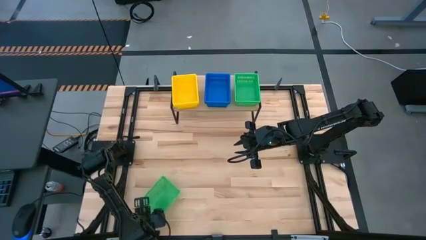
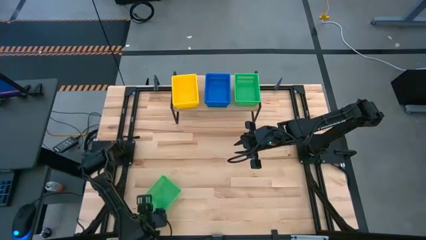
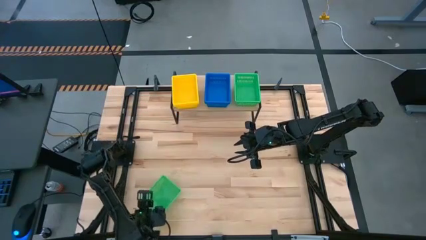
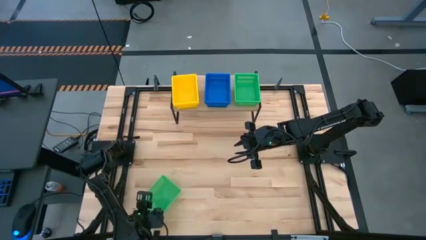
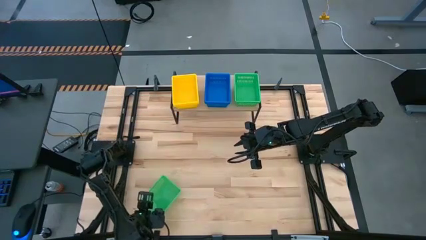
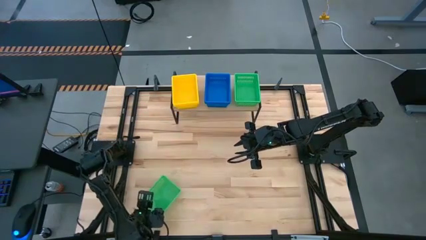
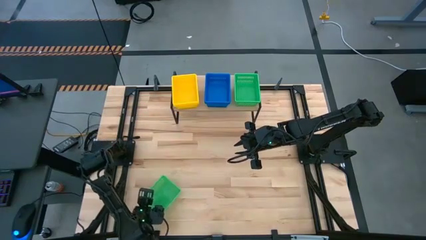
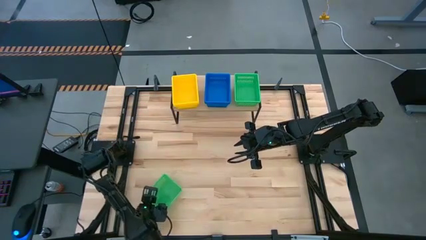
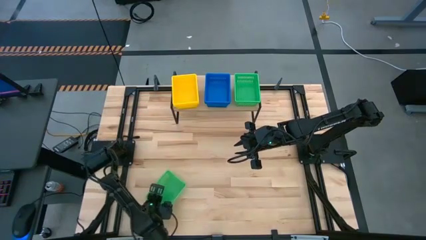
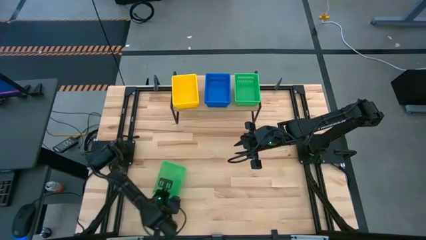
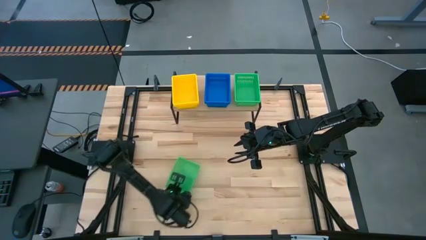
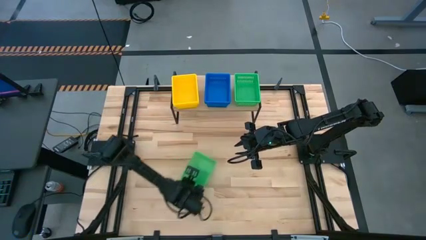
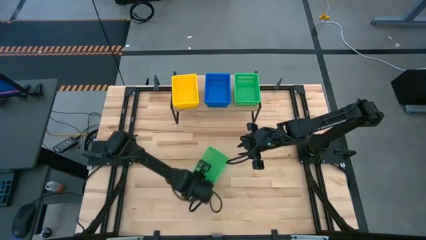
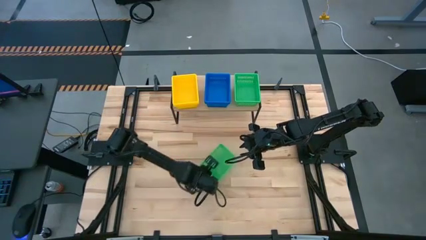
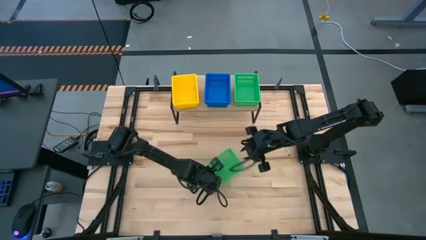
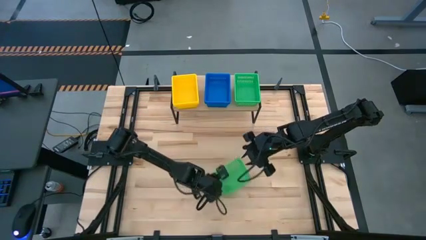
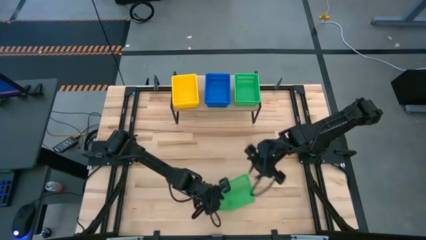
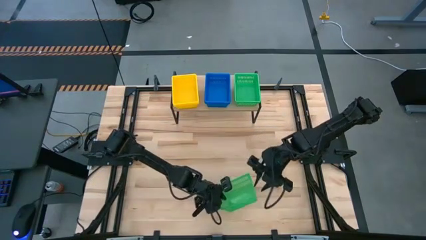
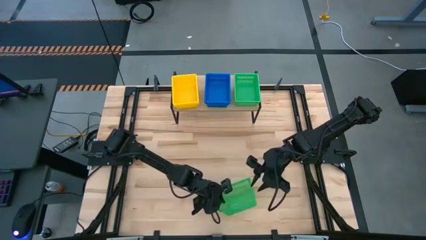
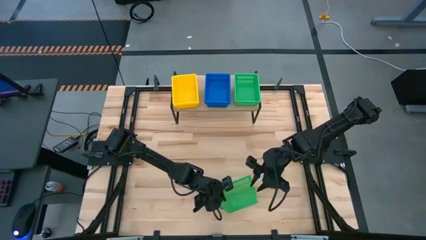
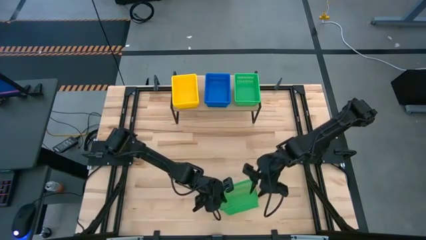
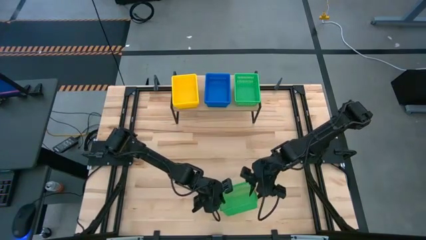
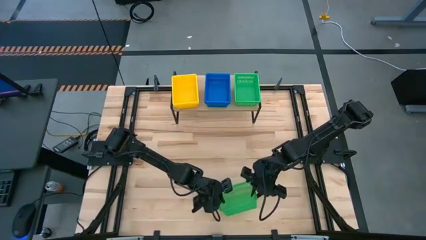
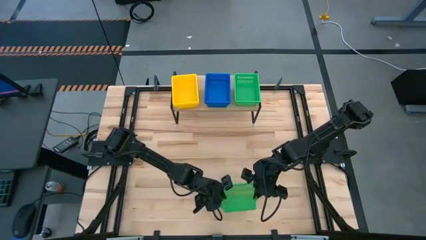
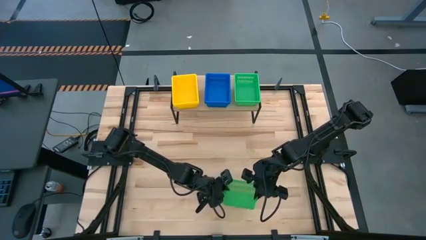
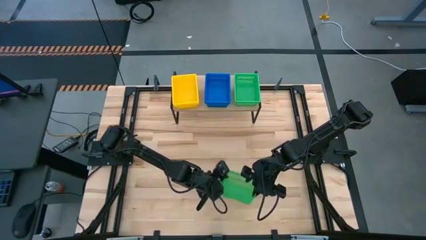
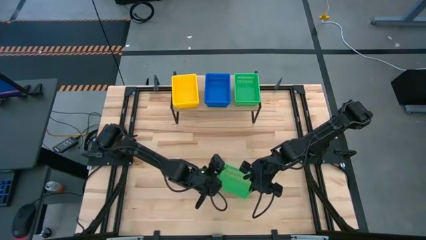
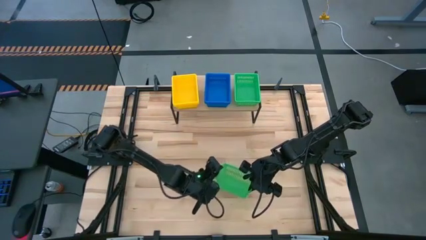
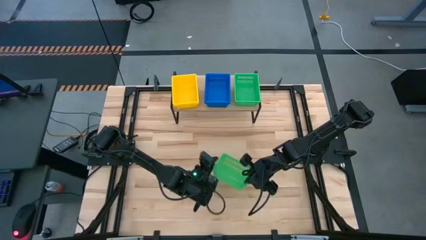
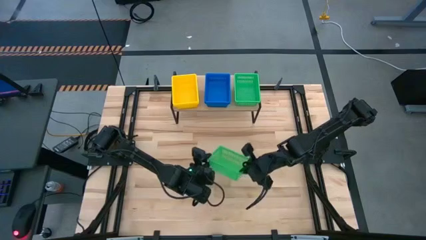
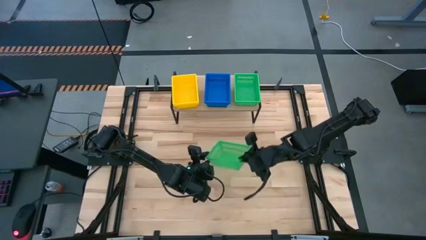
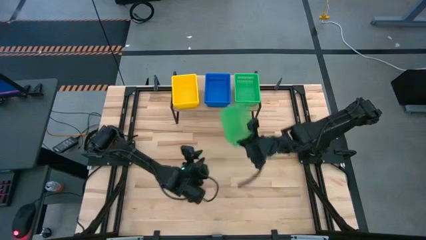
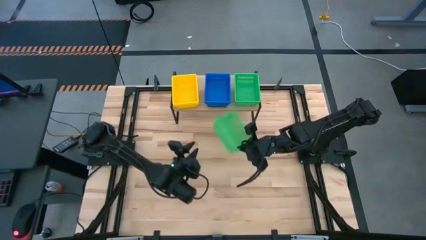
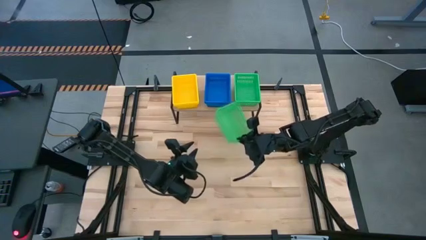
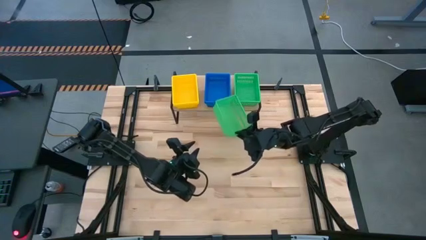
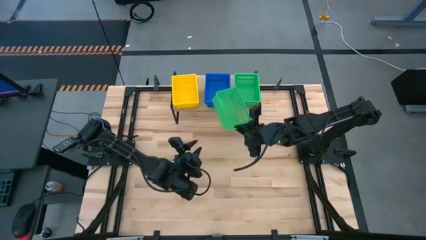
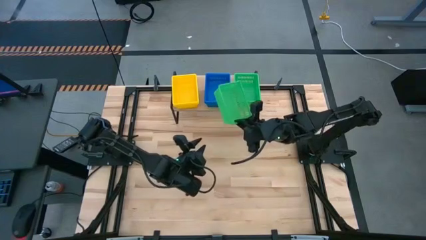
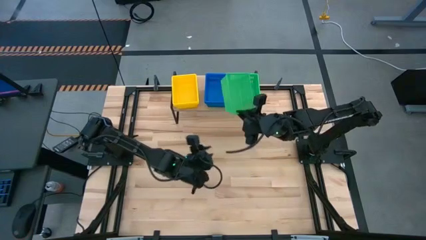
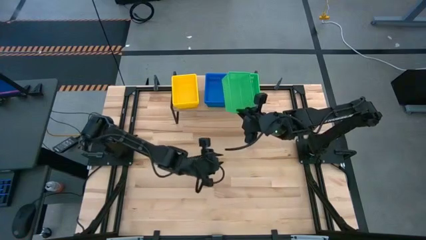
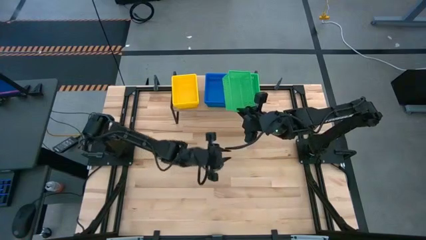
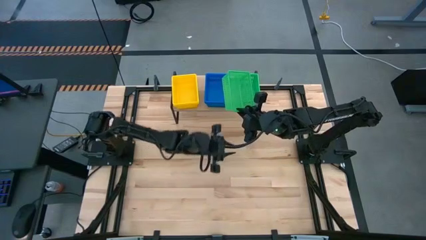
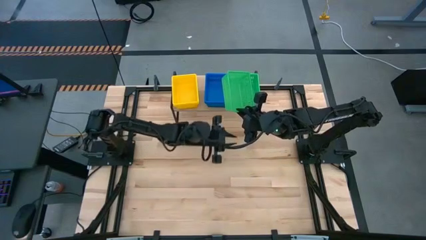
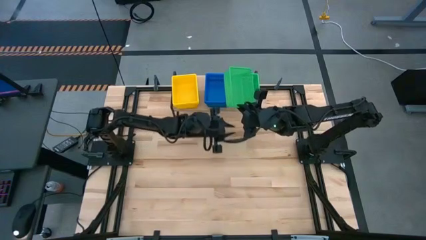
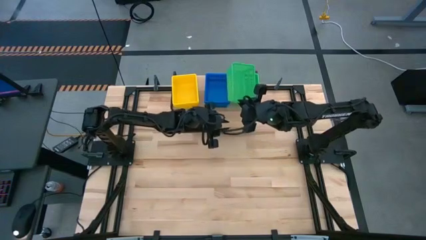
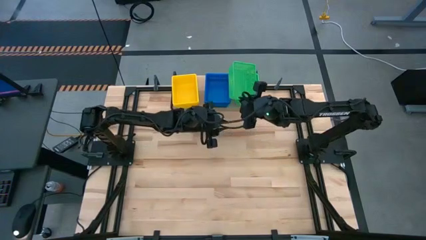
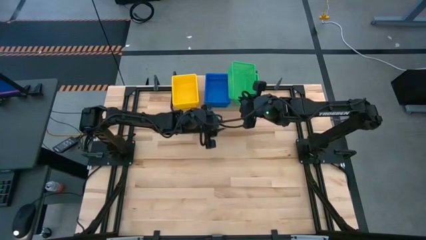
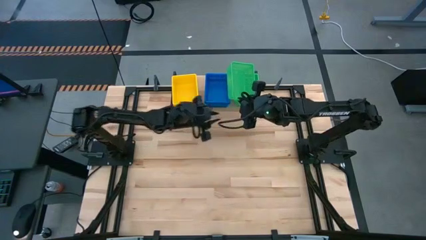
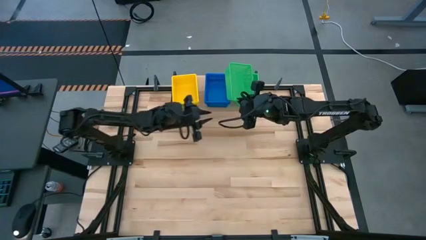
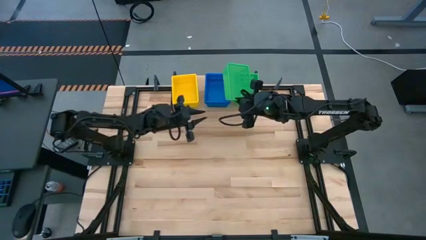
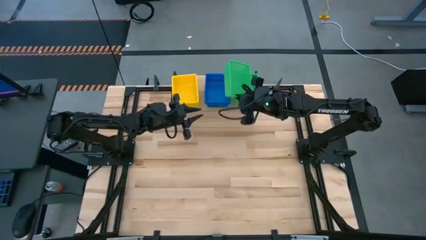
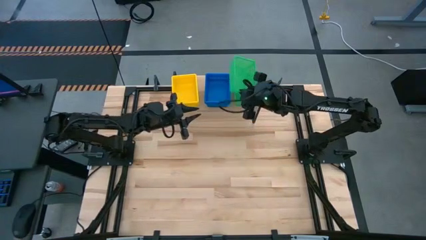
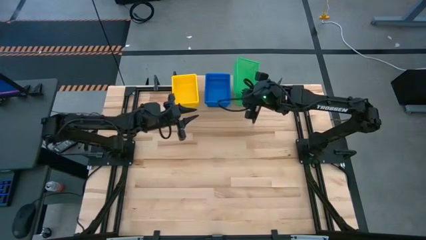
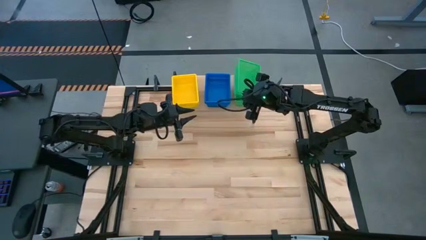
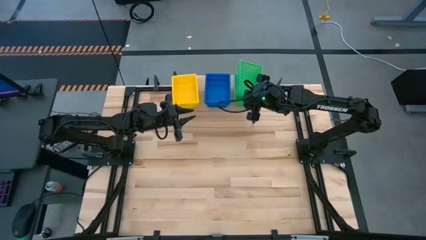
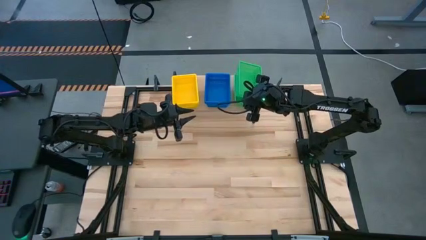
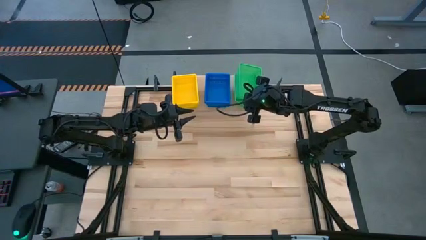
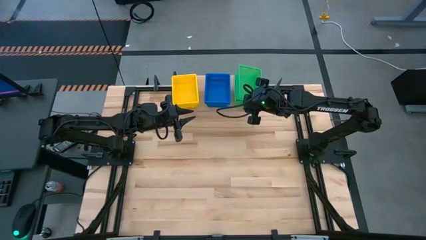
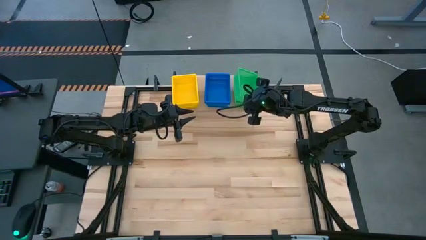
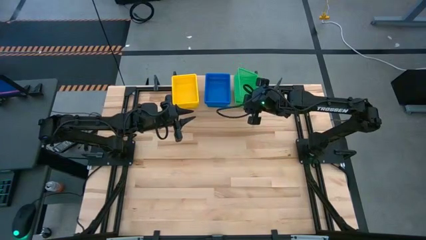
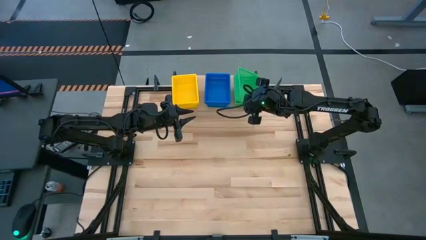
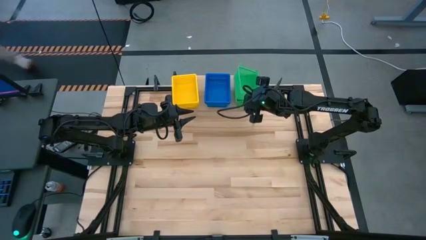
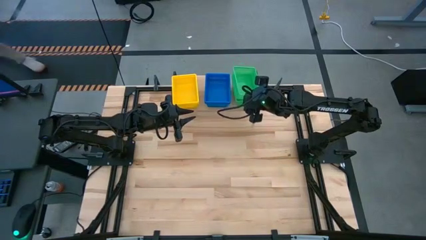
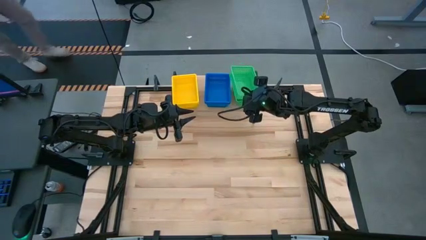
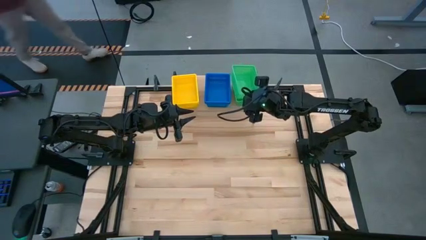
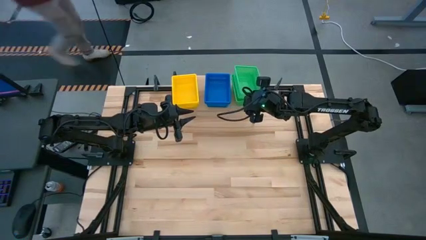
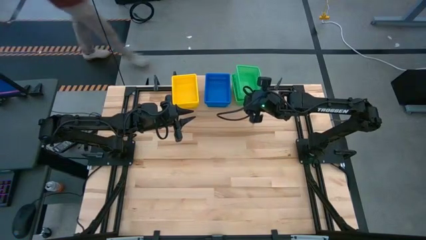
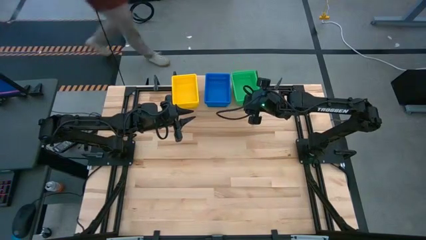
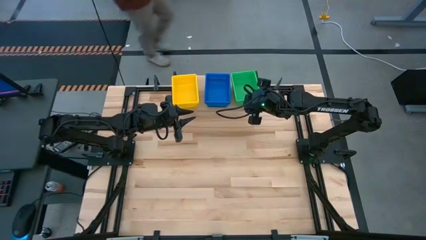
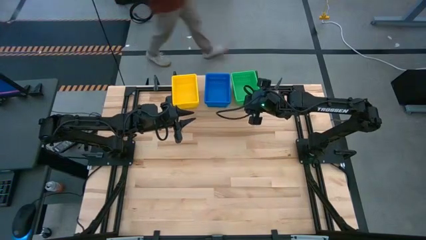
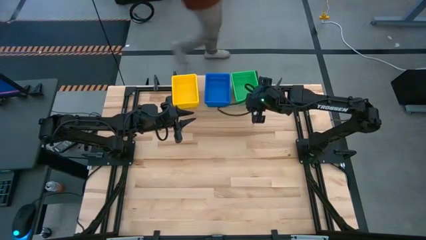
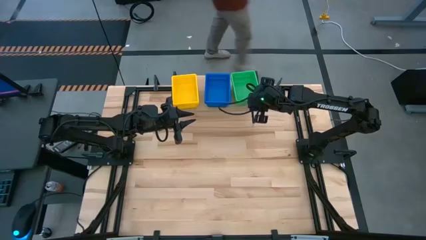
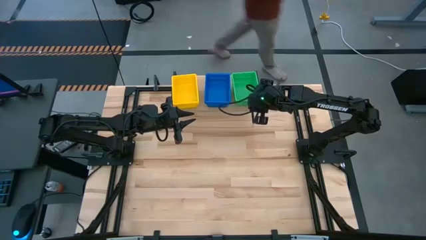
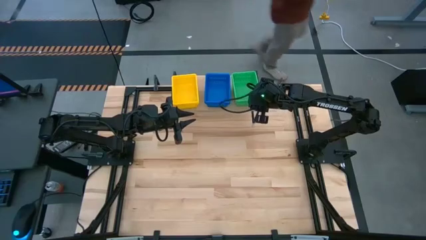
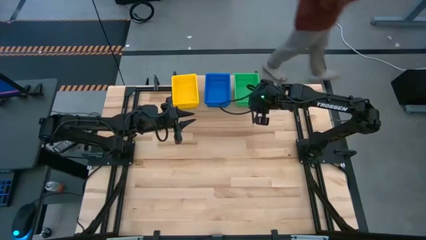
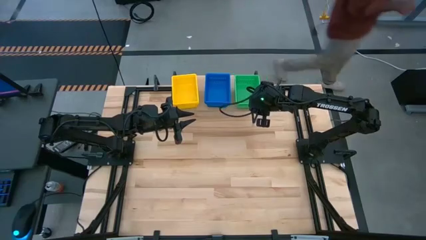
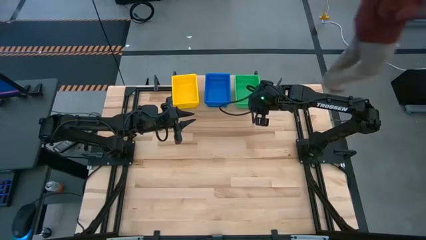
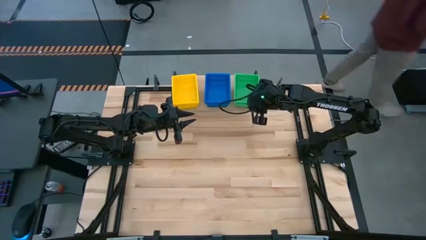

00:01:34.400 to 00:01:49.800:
Task: Stack baskets on shelf by color
Stack the green basket on the other green baskets on the shelf

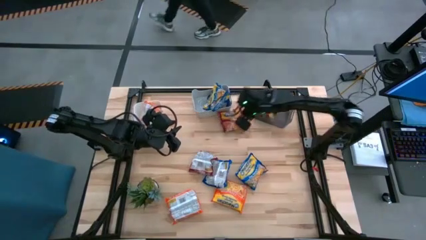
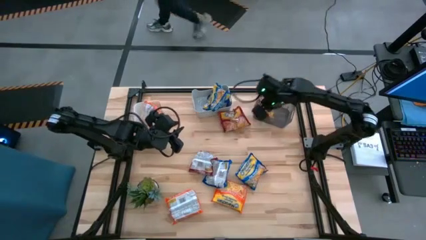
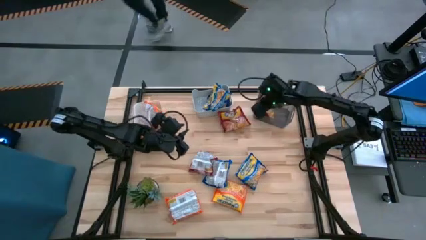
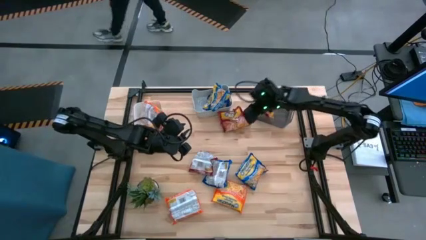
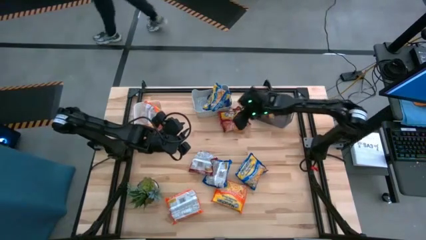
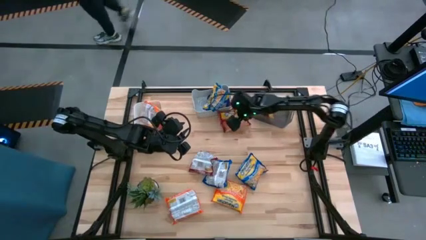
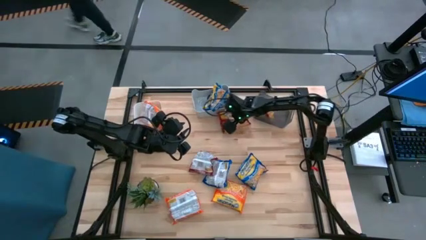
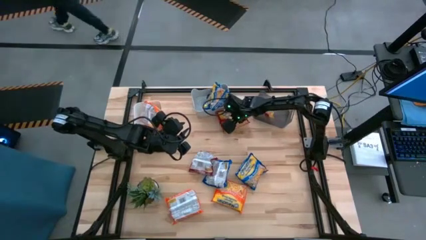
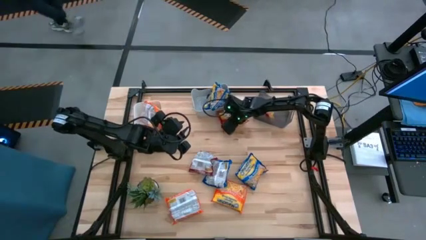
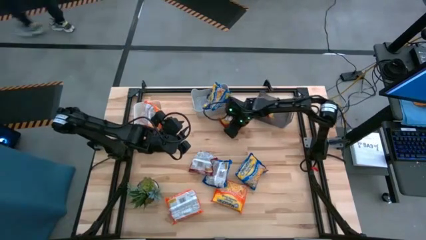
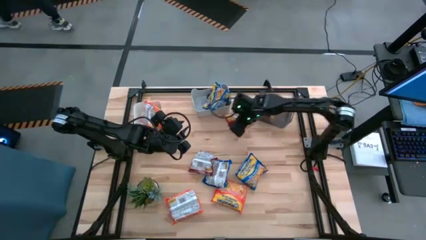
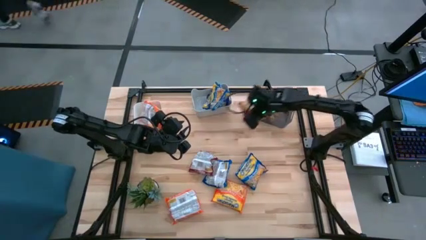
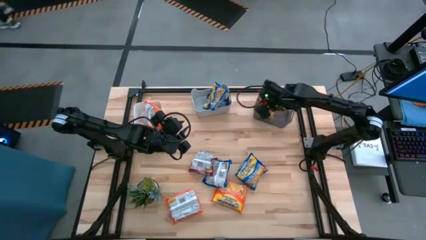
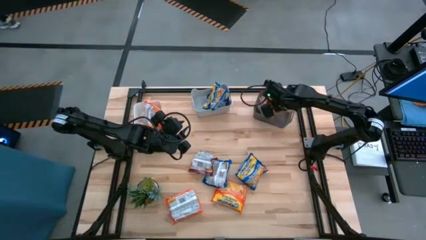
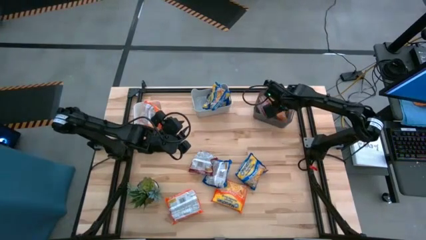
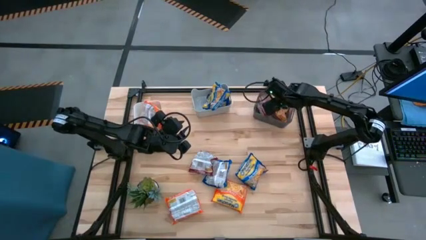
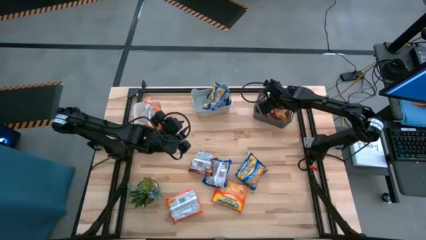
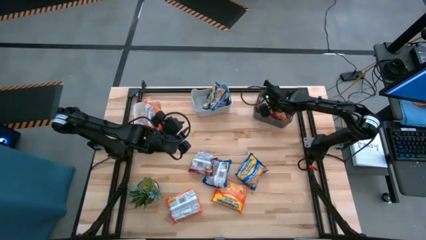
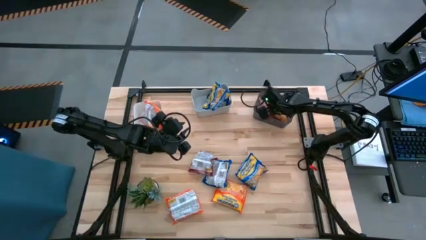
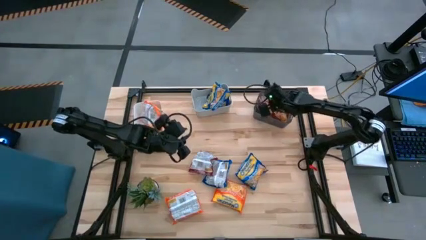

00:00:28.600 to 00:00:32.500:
Task: Sort Maruchan noodles
Put the top red noodle pack into the black bin
